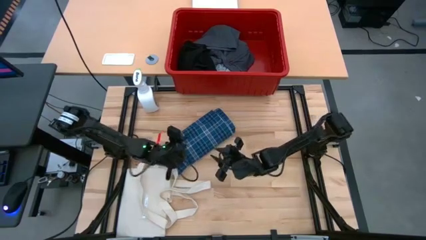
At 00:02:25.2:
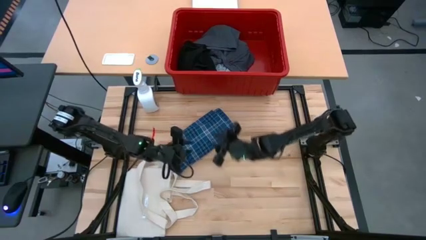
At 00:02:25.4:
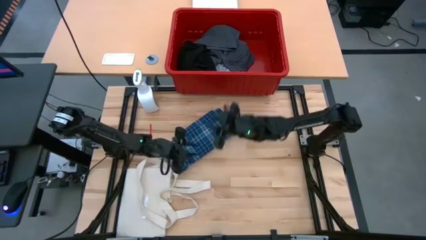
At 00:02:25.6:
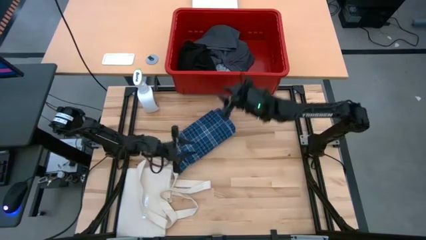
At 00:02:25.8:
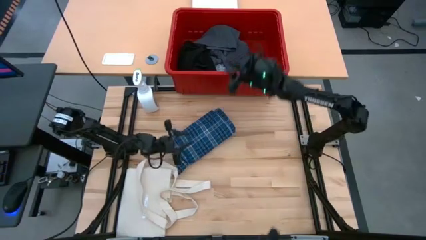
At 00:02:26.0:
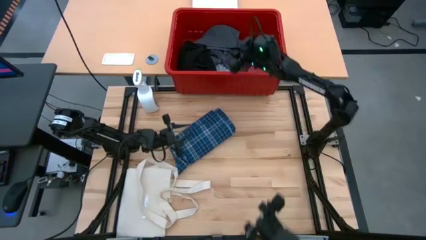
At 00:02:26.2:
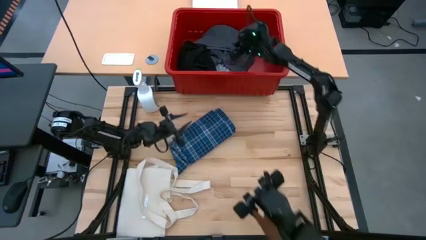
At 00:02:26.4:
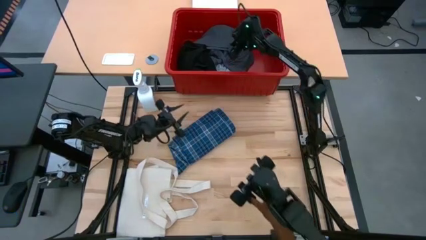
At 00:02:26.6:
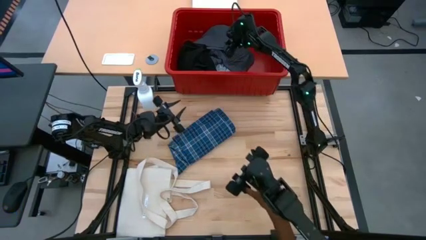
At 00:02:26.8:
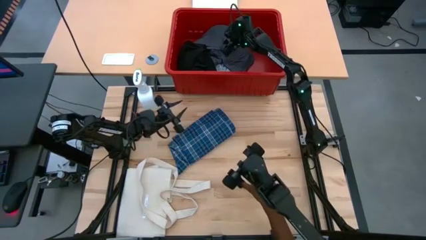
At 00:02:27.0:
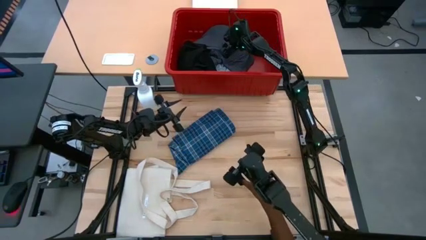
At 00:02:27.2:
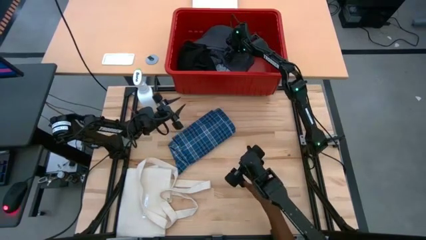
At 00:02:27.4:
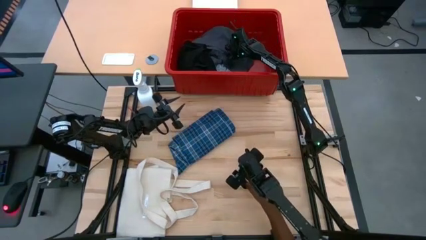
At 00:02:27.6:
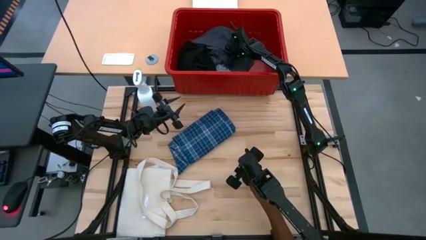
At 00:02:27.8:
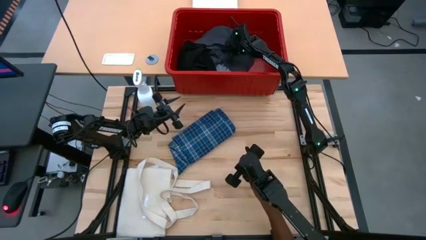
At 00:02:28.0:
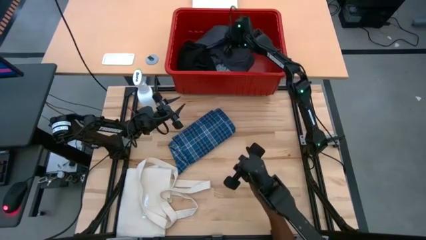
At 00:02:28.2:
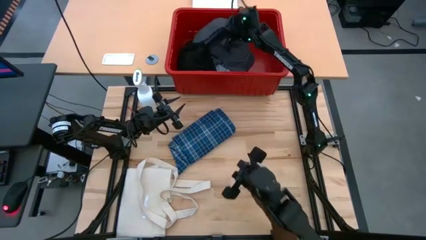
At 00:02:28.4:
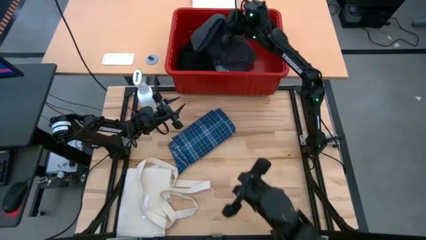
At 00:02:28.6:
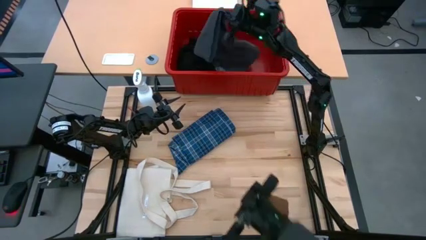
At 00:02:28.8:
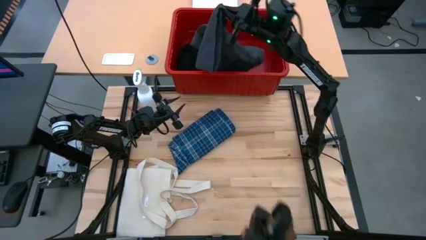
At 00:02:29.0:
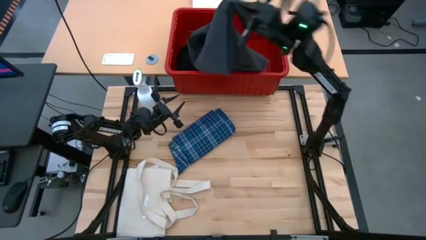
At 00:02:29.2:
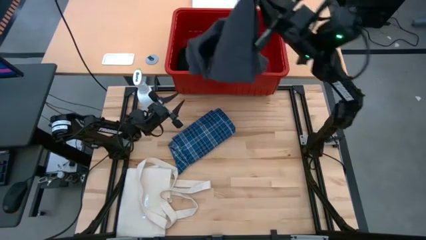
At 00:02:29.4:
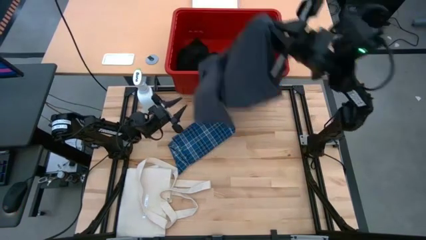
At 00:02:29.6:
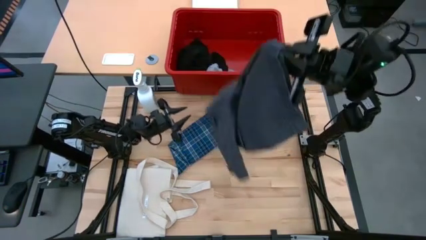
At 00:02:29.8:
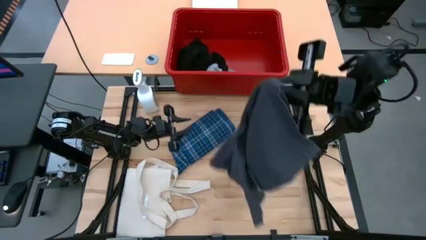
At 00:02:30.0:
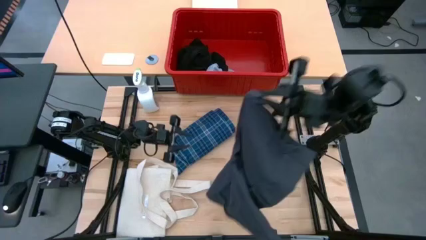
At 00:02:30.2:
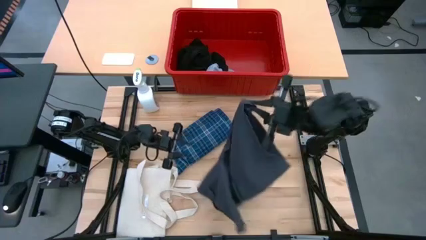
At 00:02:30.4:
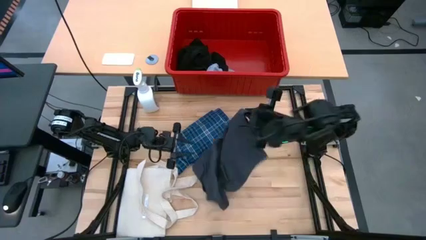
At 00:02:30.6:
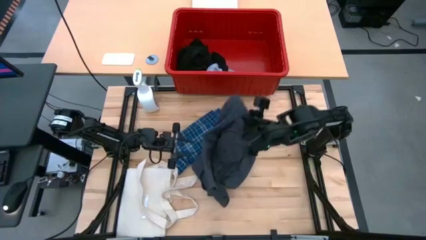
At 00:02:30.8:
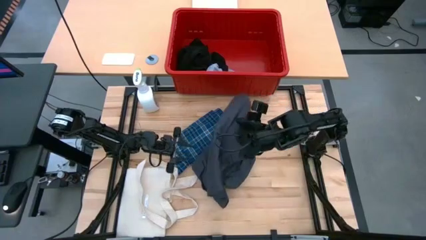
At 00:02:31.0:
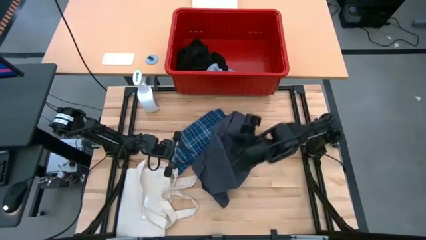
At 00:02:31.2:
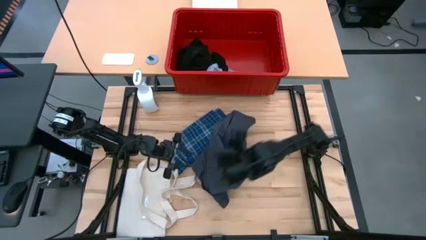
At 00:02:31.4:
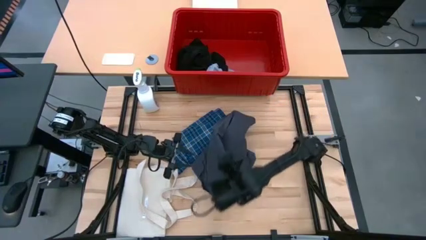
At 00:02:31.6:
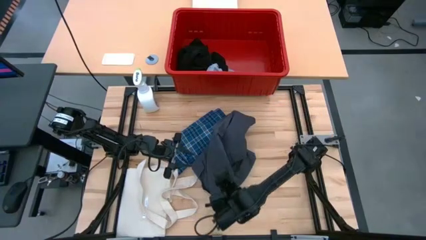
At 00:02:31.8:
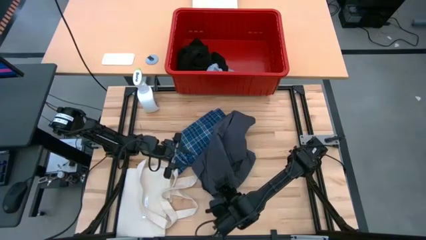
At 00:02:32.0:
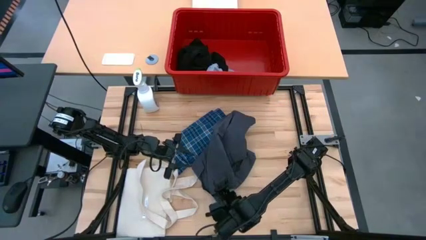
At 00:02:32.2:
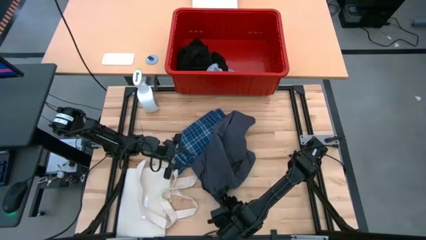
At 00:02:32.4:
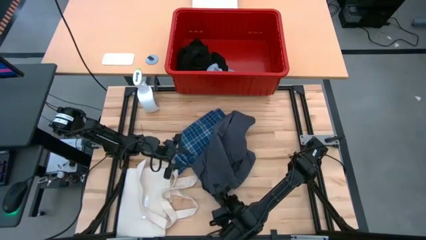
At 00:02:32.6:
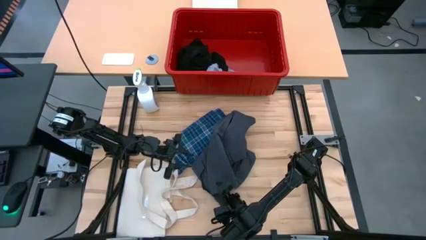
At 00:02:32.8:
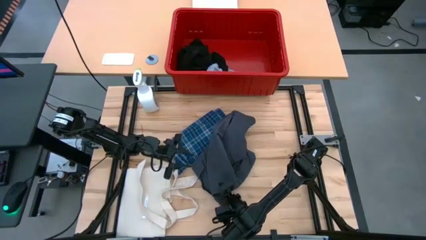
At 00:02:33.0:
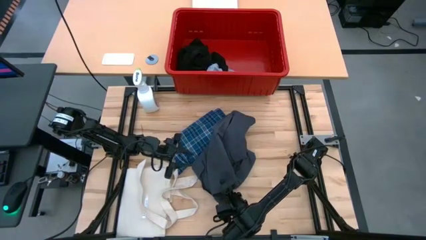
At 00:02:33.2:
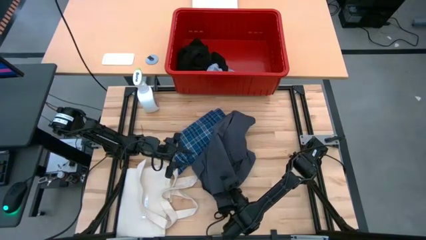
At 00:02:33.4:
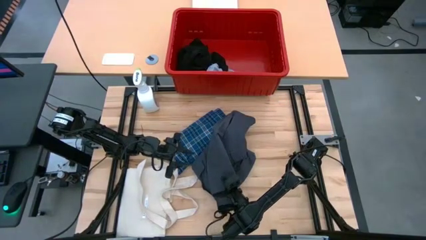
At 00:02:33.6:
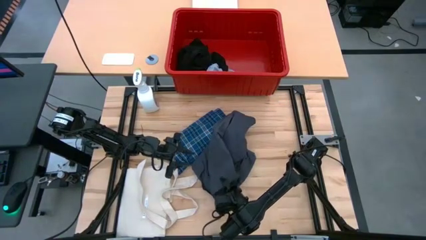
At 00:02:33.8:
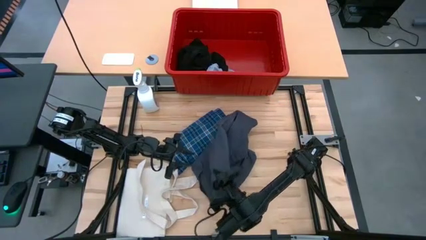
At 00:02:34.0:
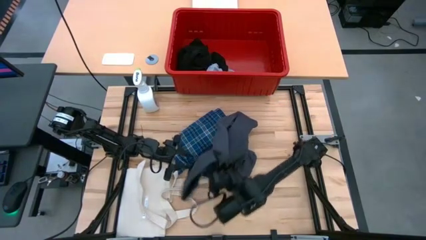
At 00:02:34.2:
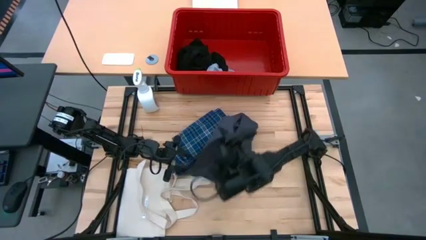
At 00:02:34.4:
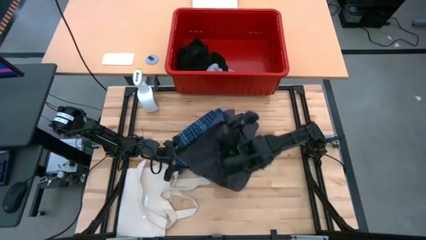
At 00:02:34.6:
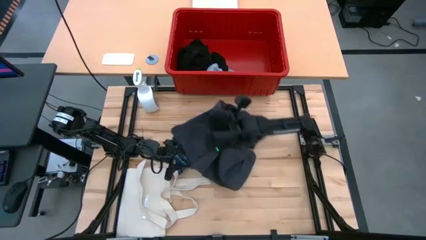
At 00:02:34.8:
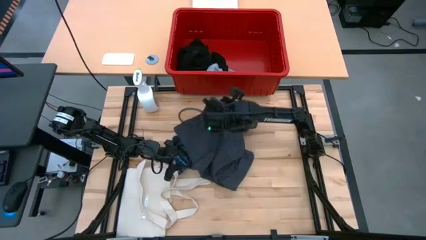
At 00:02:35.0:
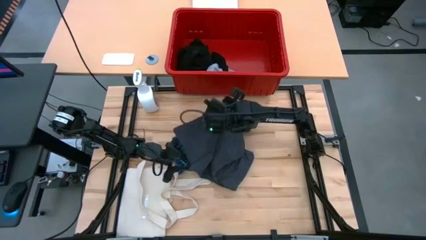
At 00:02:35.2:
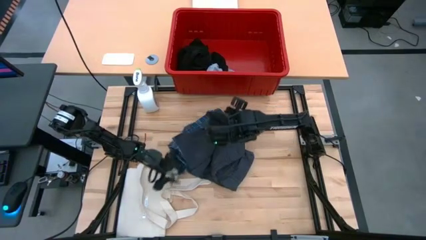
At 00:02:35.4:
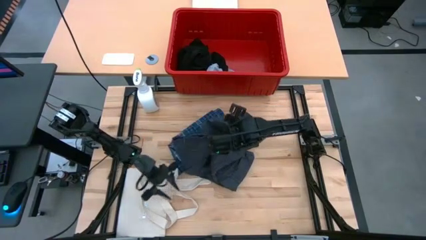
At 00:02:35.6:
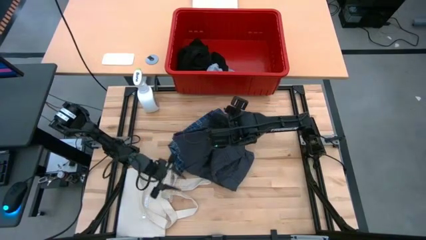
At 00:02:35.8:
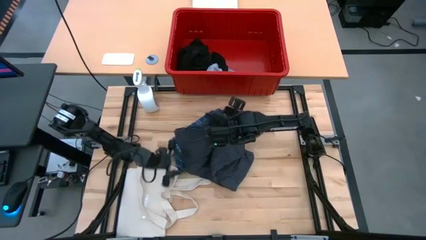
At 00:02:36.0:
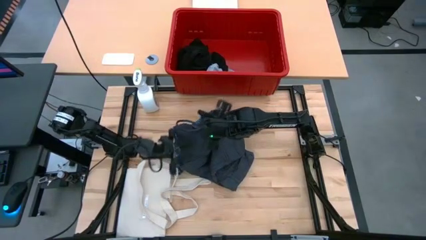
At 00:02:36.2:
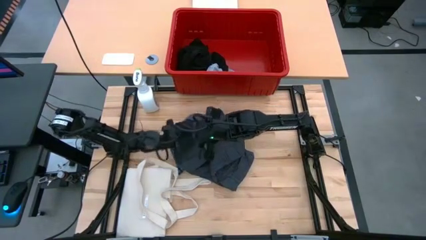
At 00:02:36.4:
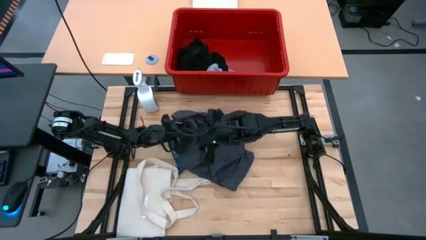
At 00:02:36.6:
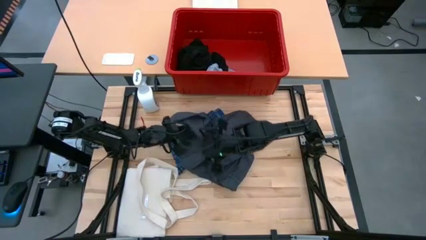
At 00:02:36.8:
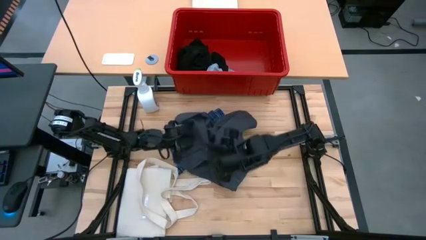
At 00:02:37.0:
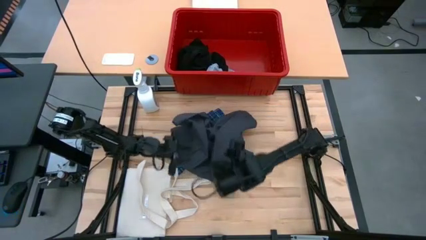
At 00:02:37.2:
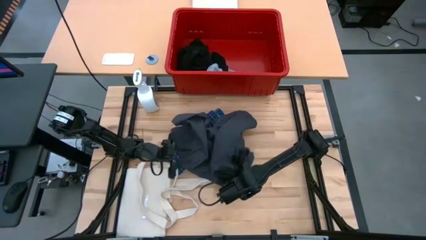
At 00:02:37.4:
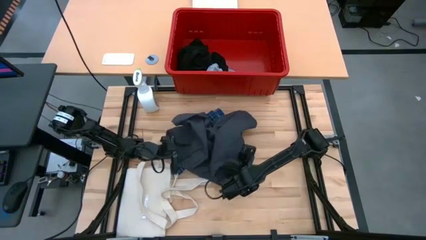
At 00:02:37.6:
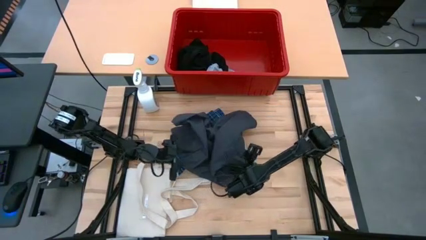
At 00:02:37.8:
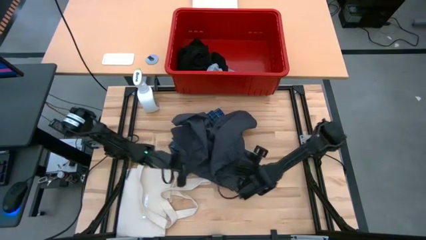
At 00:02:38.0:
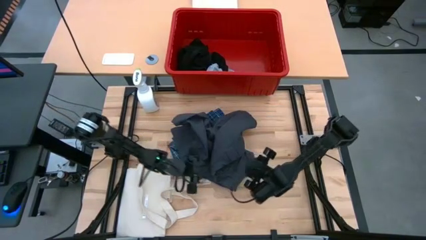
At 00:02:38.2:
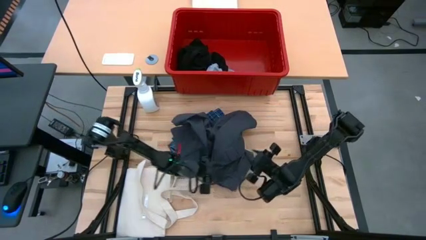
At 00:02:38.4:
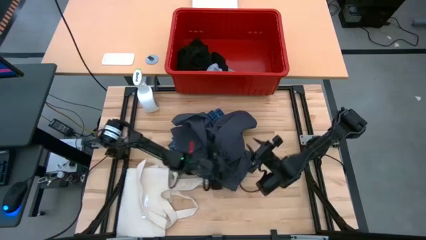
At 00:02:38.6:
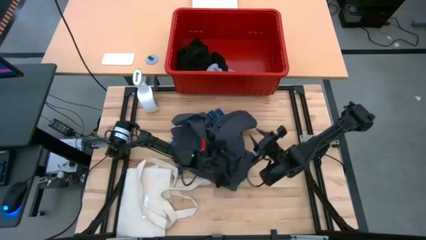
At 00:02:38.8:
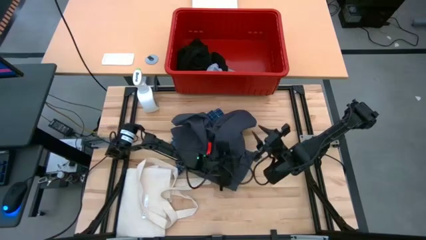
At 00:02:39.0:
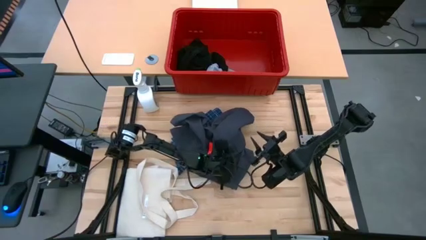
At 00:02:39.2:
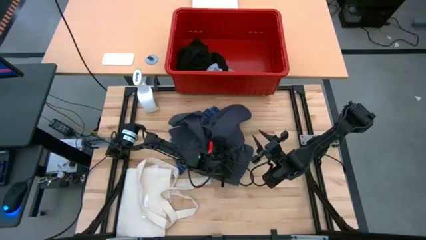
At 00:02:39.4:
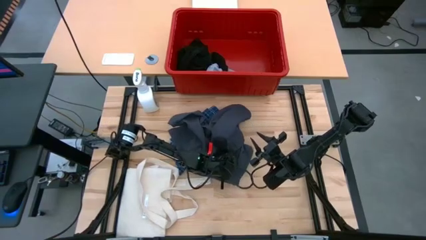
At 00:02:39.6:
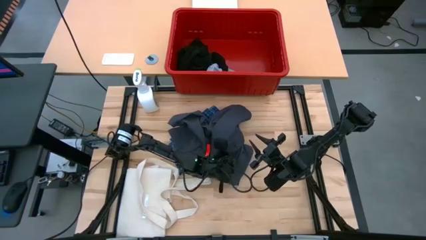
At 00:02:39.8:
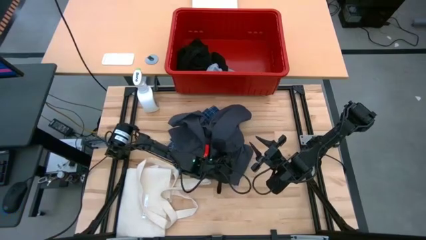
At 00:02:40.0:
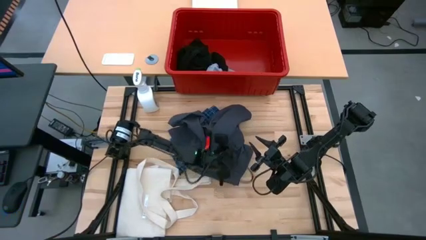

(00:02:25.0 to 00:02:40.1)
Task: Fold Laundry from Bin
Fold the gray short

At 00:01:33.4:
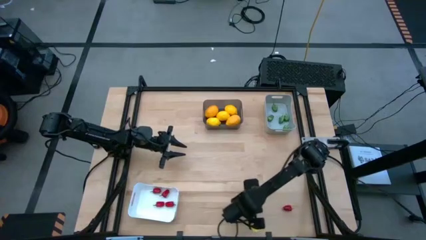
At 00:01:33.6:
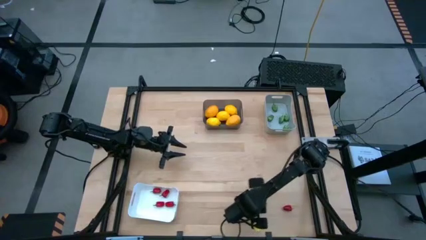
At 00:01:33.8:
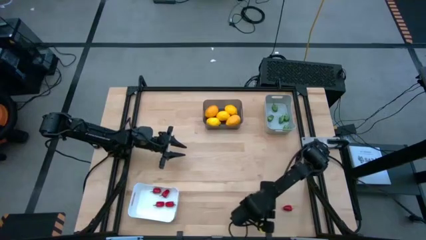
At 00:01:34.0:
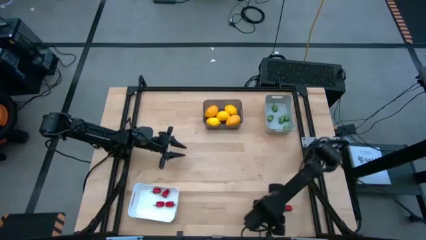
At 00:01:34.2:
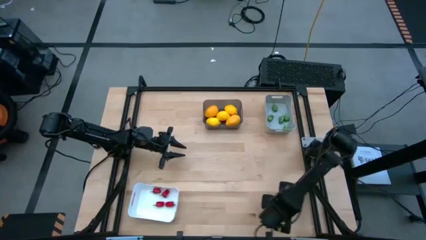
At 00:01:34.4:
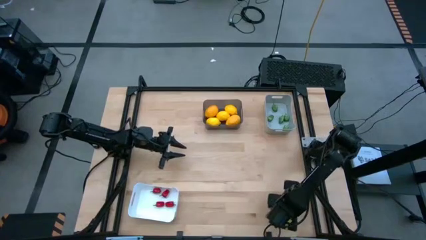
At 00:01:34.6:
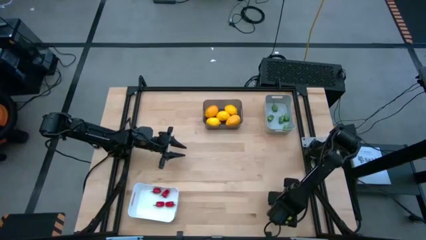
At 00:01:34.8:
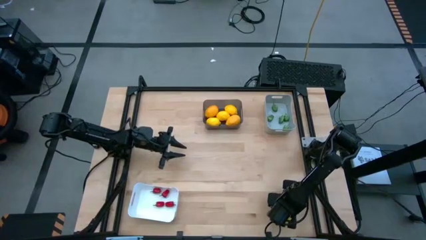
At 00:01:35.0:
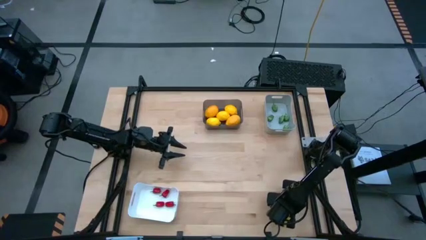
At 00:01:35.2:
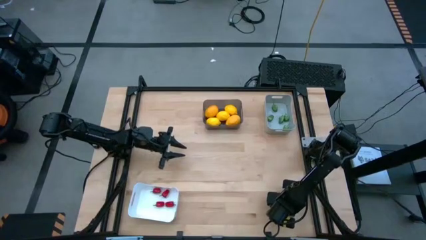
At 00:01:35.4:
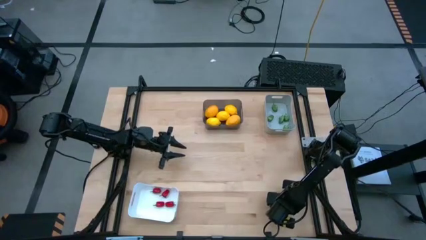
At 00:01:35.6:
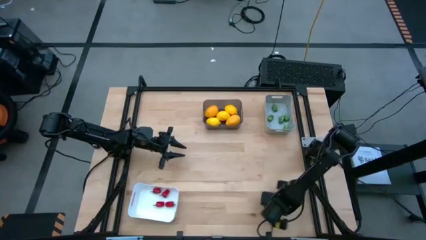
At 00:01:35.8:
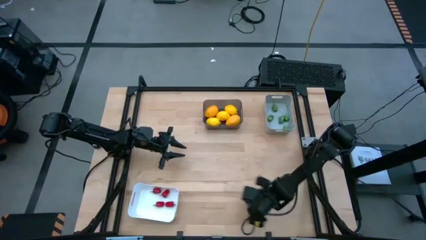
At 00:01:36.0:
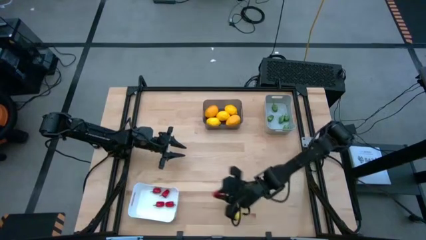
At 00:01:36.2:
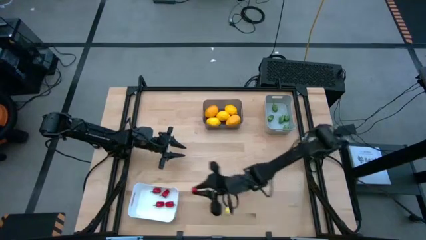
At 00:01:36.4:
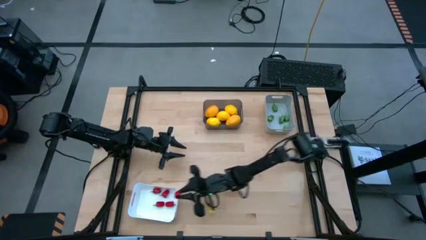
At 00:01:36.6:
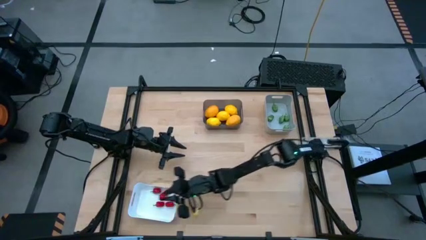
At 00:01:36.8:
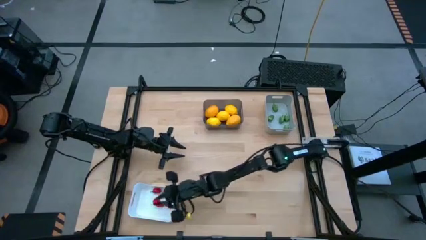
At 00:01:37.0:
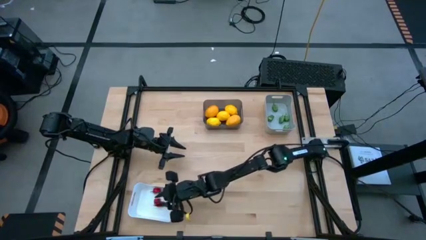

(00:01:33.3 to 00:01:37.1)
Task: Sort produce into baskets
Put the red pepper into the white bin
